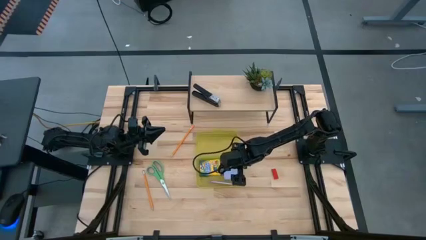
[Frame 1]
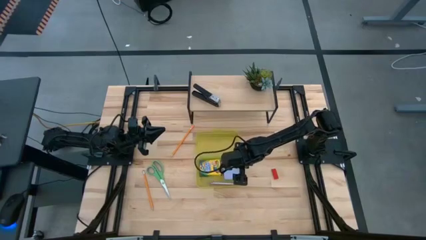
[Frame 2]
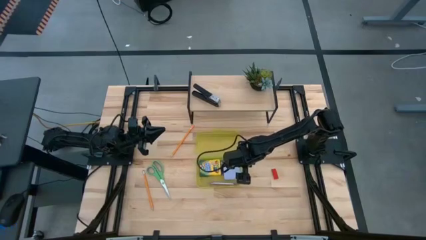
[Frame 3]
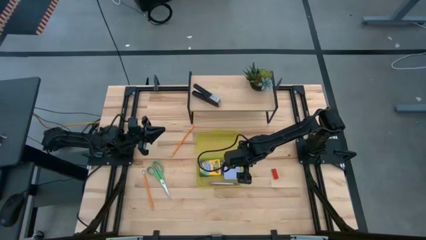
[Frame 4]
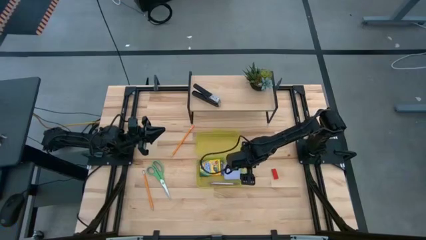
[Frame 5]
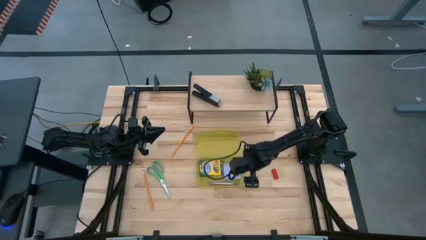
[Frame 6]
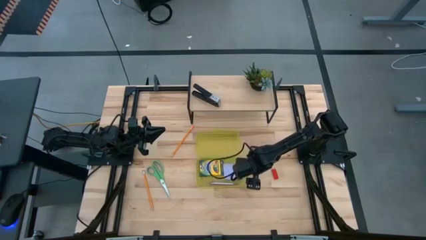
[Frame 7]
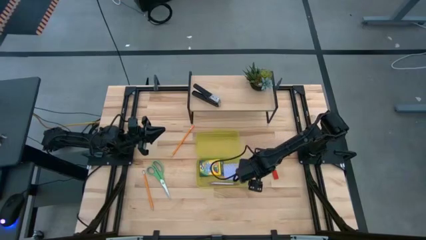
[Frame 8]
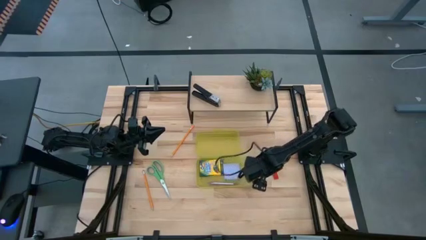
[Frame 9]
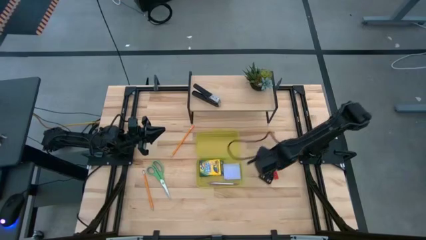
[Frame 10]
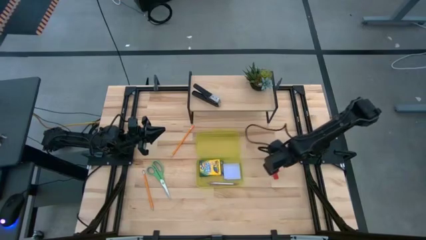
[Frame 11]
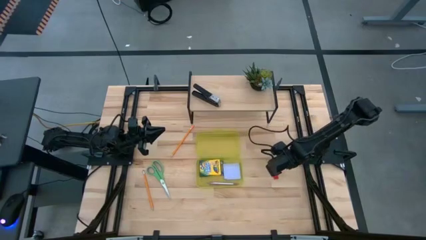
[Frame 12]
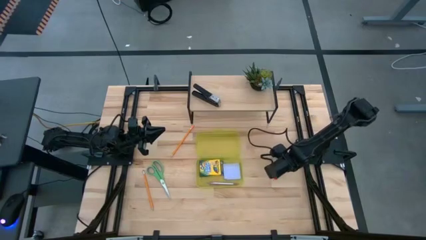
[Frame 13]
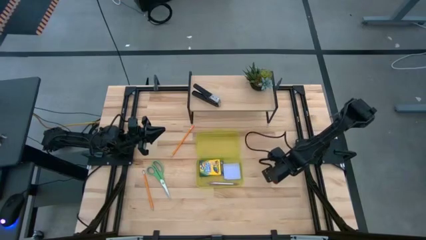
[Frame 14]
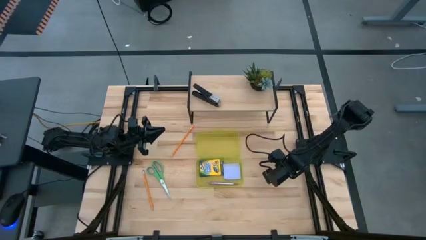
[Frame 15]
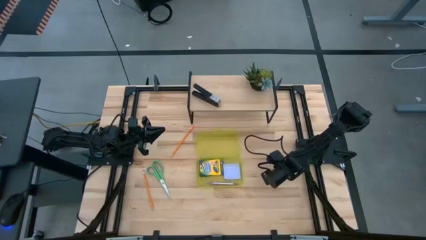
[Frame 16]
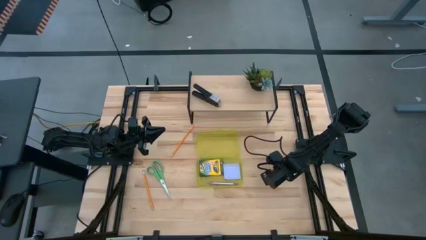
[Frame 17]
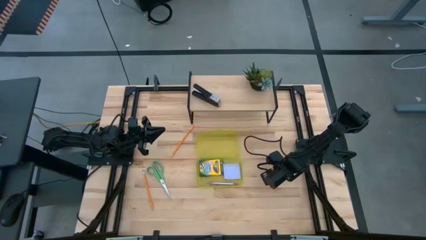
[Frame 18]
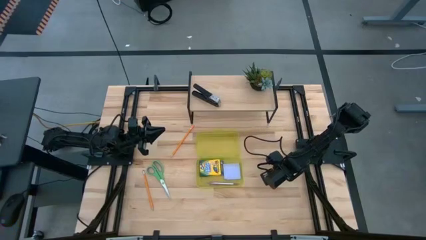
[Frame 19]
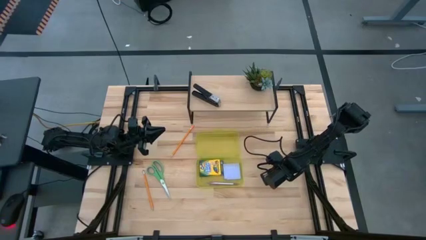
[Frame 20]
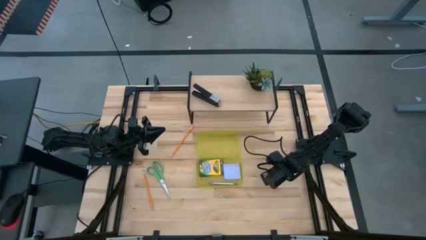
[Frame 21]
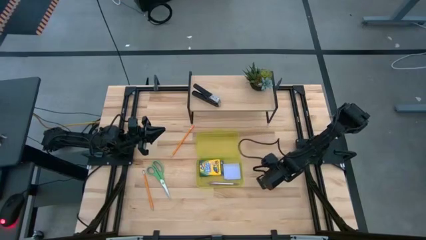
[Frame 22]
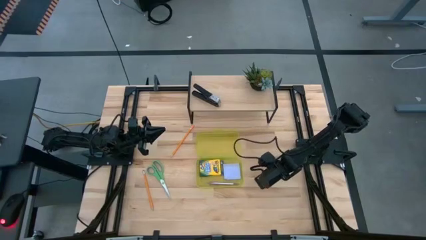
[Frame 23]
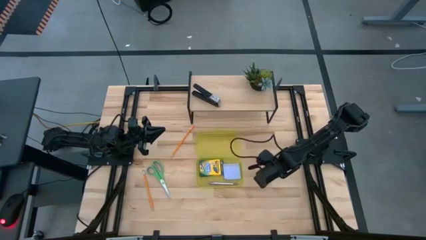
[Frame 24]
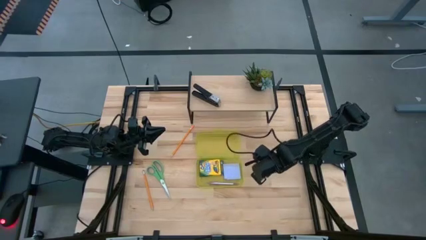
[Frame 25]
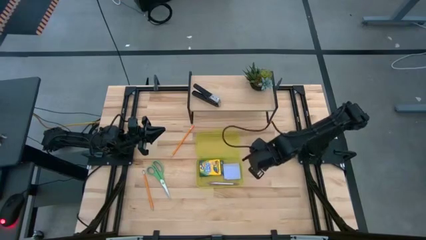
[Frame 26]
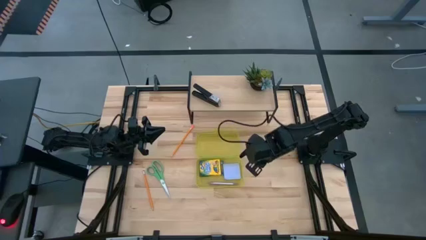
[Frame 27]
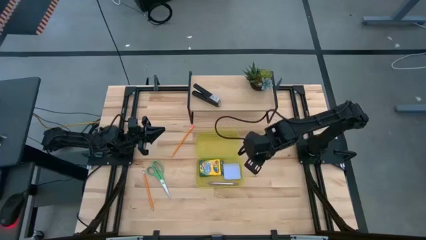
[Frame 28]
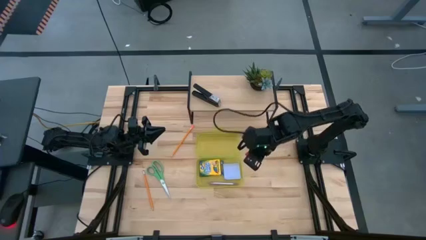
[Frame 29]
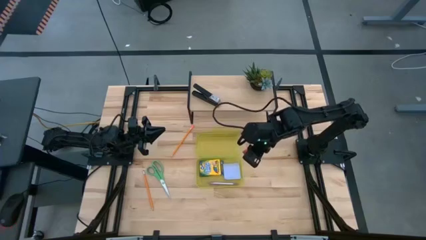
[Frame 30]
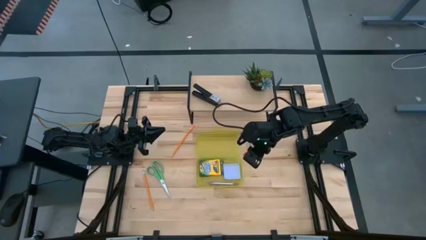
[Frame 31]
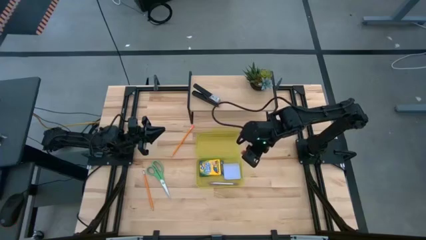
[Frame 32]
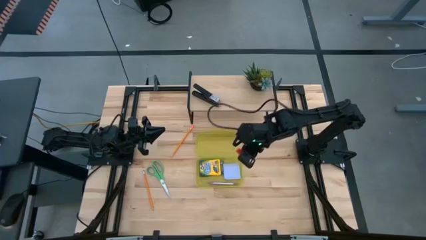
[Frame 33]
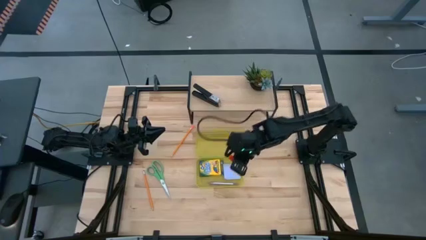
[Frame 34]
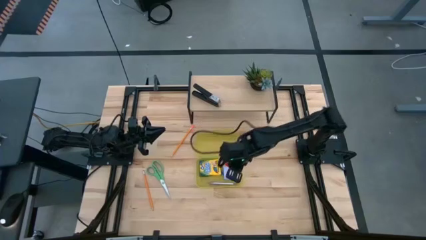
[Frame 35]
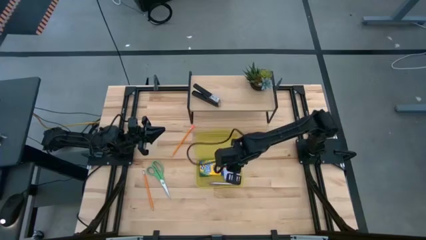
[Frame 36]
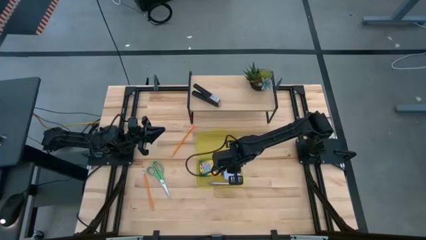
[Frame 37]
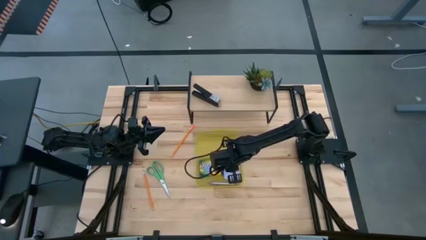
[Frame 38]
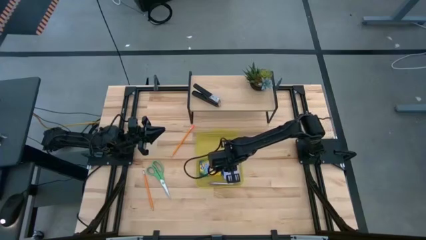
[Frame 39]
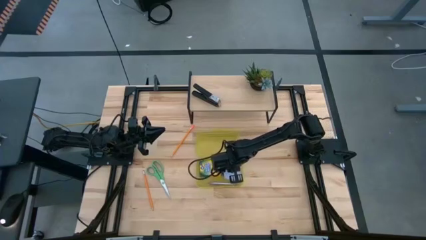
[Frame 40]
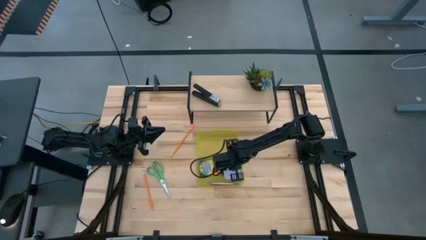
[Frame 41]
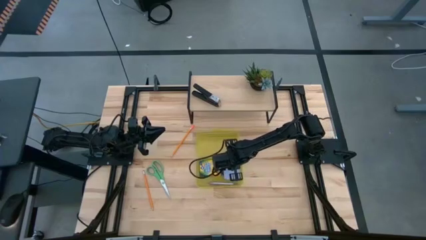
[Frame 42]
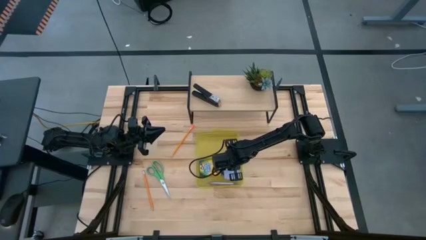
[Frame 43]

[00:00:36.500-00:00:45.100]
Task: Pack school essentials
Put the red eraser into the yellow supply box
